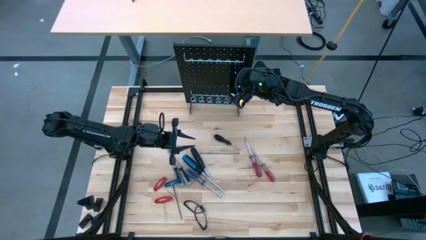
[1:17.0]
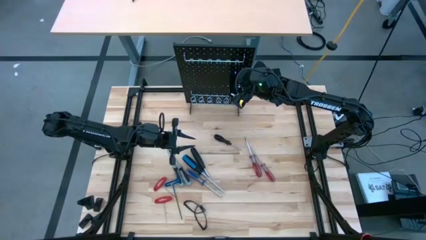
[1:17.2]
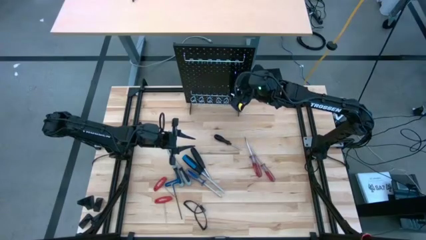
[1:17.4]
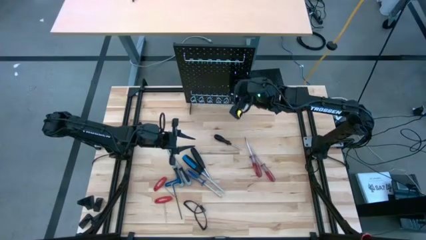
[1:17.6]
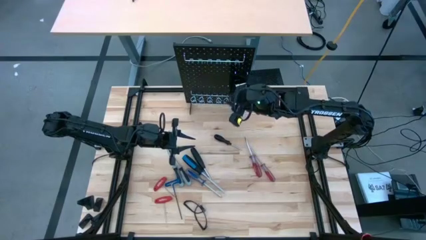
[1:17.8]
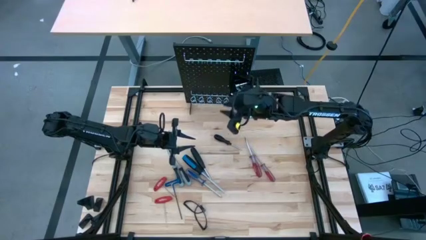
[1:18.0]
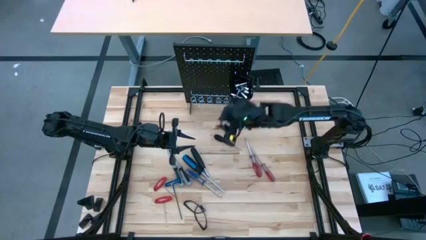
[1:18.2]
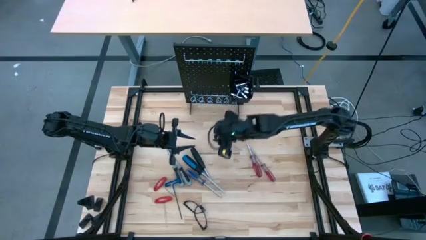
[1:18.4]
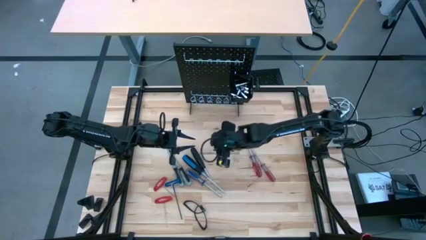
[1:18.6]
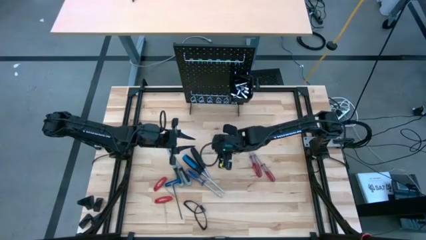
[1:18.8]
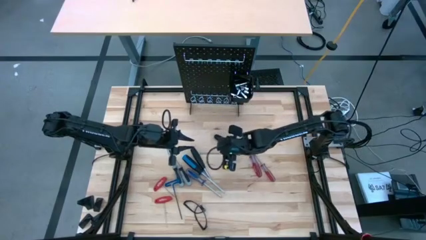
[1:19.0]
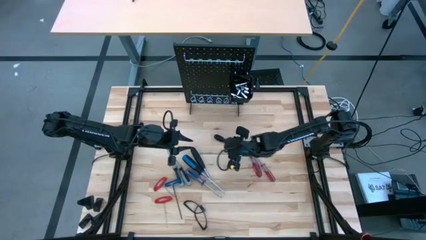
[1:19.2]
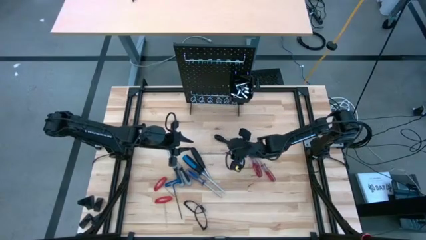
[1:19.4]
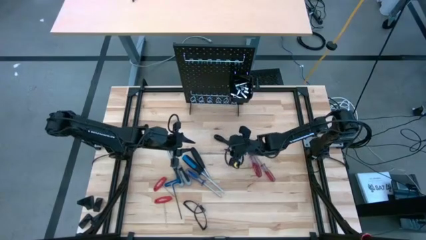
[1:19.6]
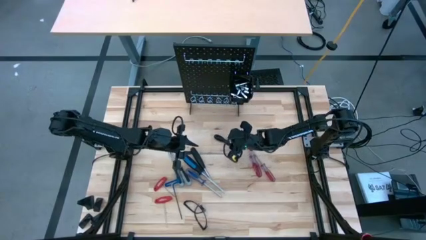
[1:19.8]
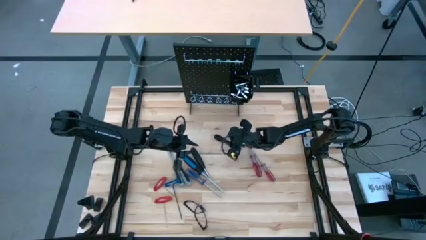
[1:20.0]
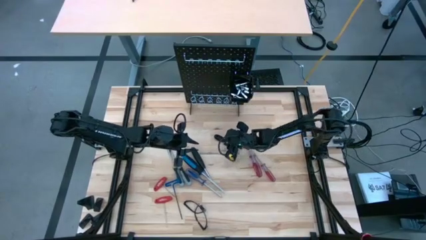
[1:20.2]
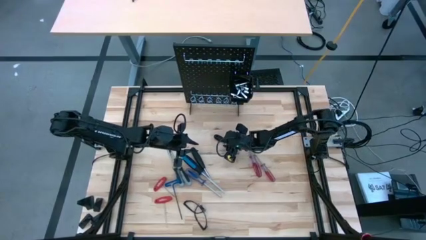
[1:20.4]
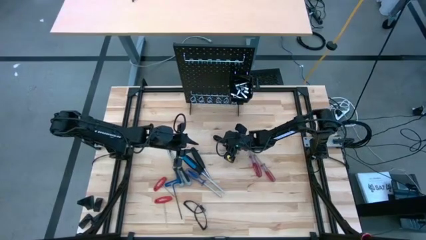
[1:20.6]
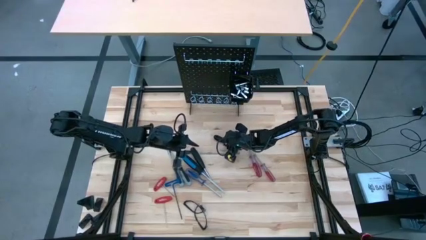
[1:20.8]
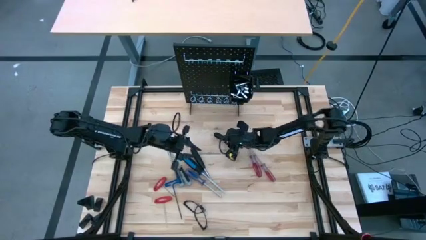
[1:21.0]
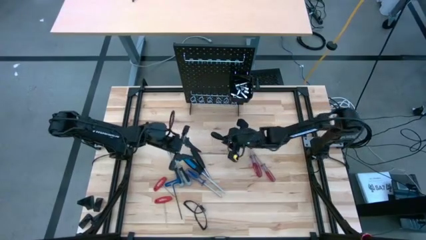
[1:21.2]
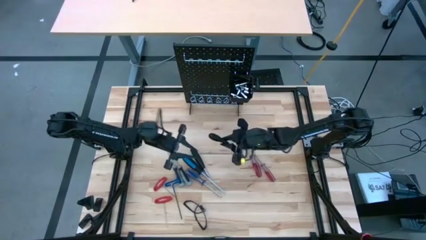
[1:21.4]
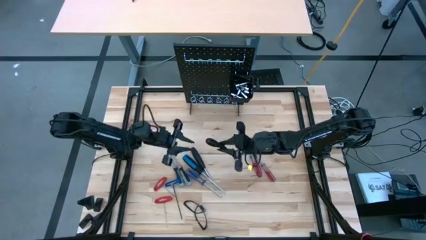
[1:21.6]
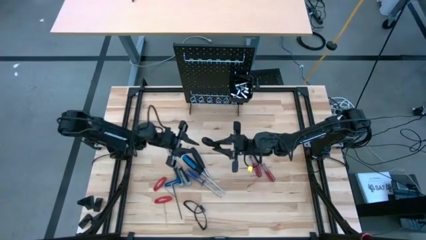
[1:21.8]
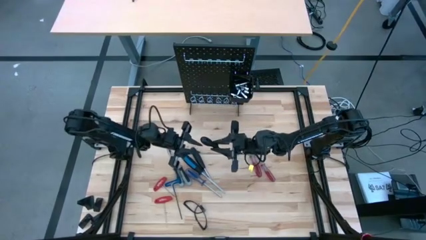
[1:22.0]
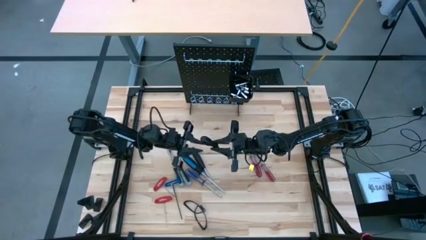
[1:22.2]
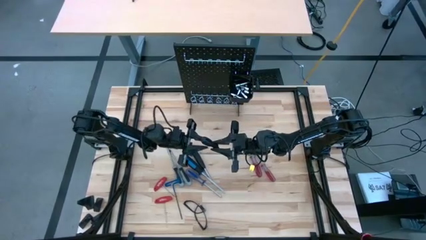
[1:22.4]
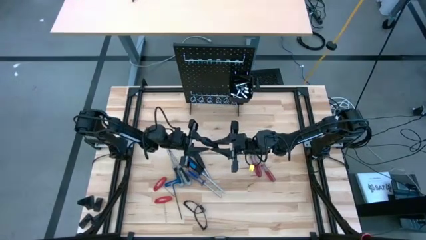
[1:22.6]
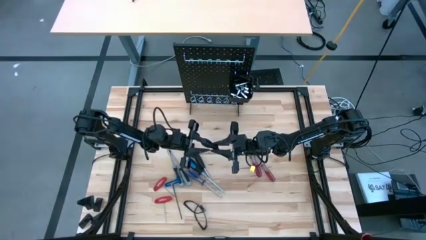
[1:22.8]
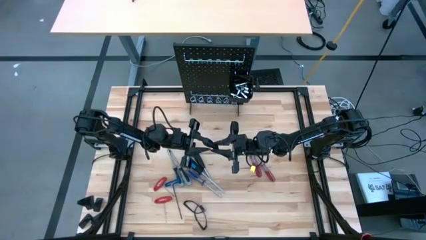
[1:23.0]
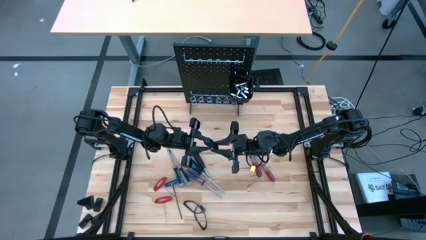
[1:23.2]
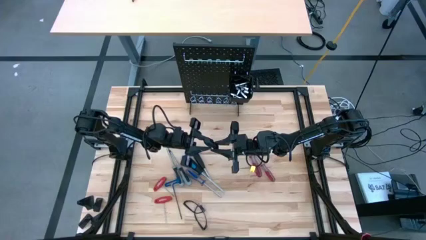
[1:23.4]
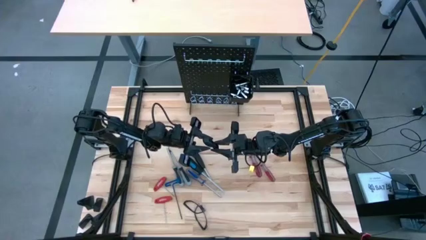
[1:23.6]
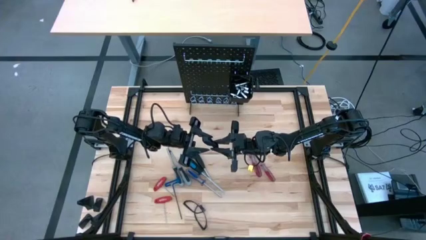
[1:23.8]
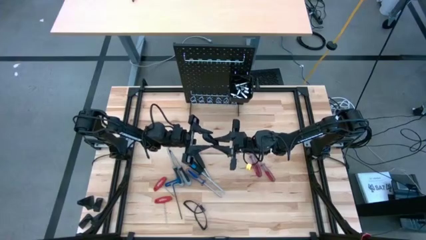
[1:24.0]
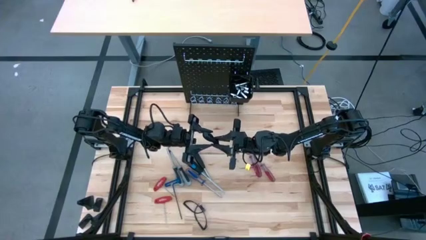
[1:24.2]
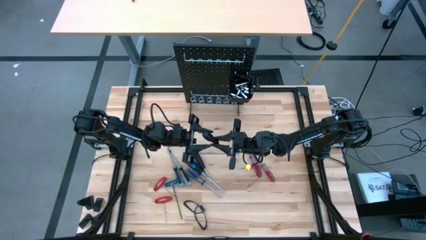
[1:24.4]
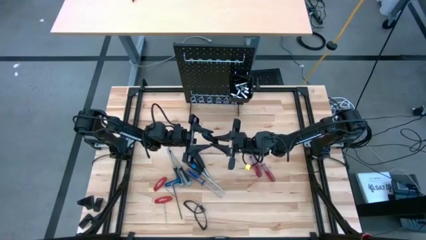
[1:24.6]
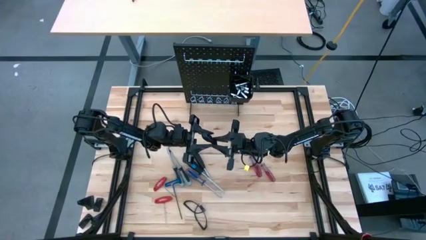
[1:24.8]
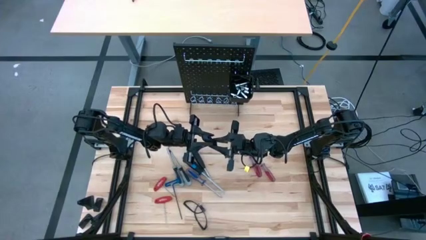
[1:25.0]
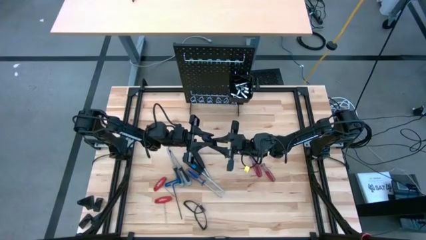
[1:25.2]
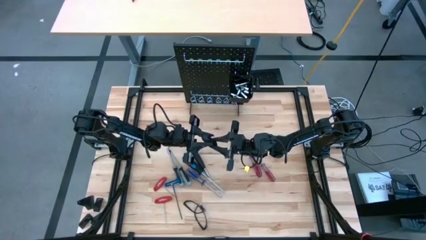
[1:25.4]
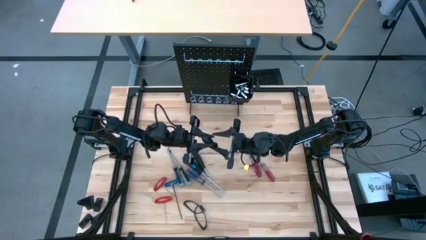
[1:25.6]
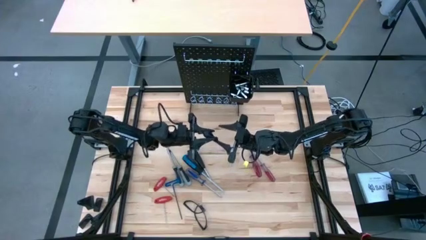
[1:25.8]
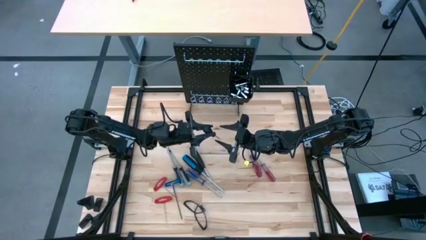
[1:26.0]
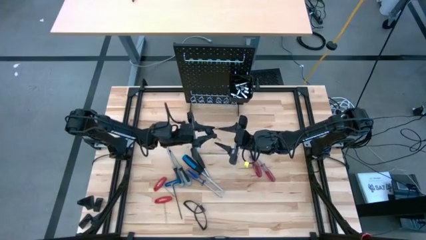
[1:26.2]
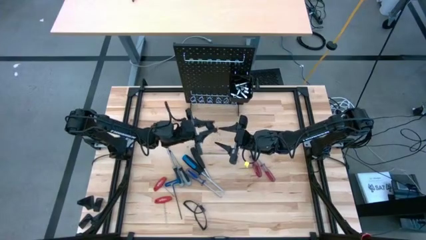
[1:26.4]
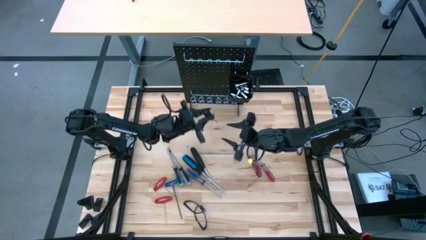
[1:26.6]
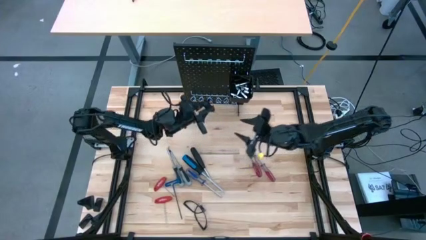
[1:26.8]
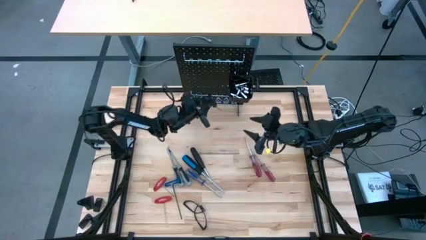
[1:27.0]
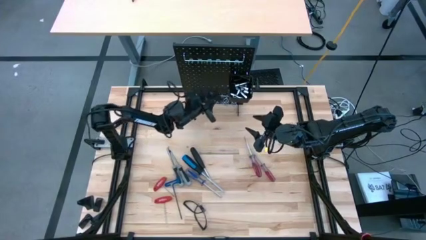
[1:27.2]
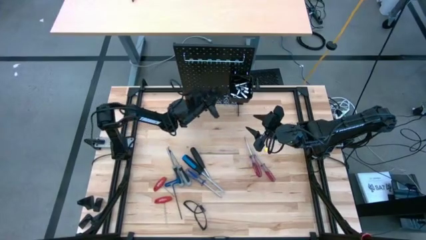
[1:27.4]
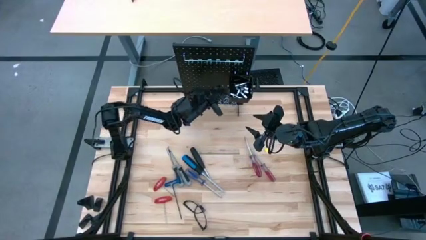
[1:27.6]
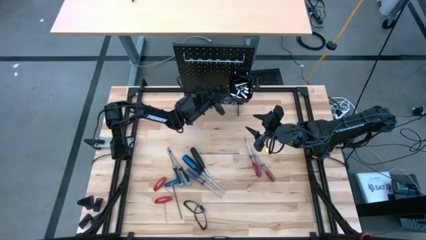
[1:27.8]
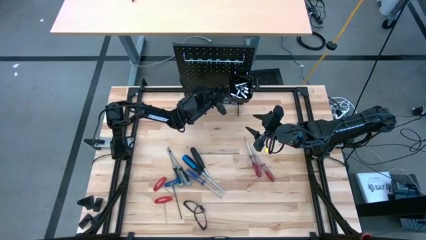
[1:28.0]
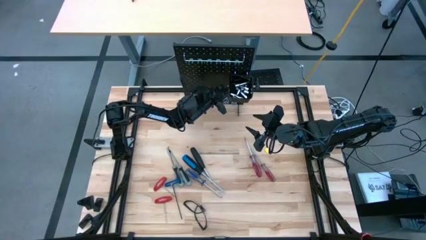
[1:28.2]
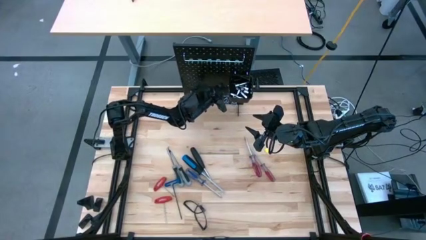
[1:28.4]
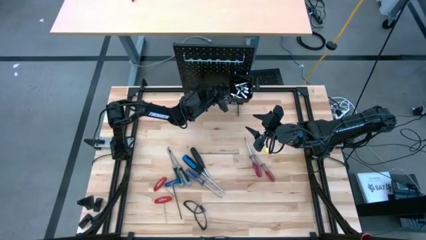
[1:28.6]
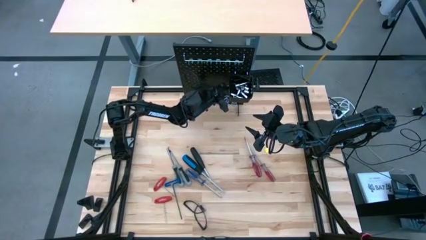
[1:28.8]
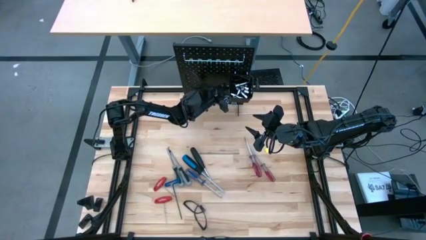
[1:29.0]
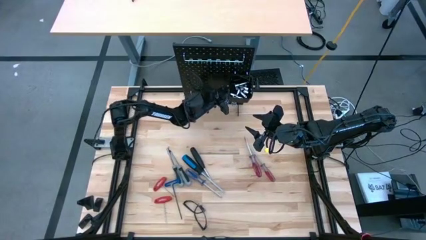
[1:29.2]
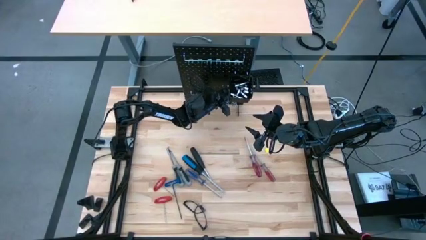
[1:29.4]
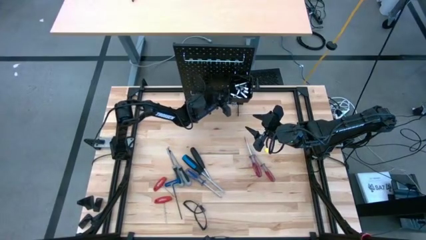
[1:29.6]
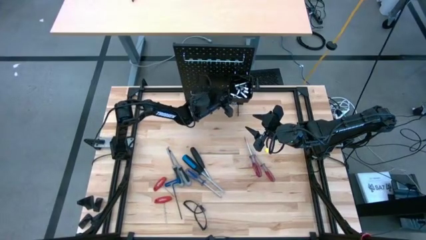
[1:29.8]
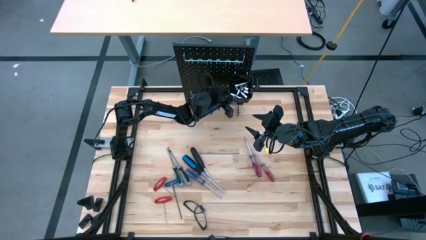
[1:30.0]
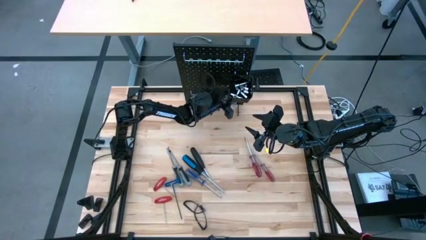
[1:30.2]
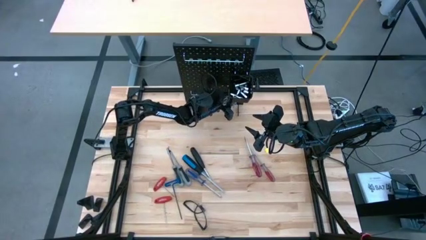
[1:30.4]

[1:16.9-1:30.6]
Task: Hang tools onto peg board
Hang the black screwdriver on the pegboard

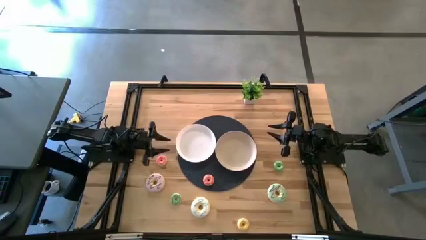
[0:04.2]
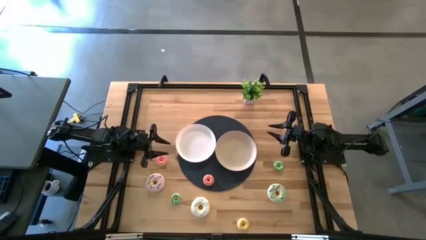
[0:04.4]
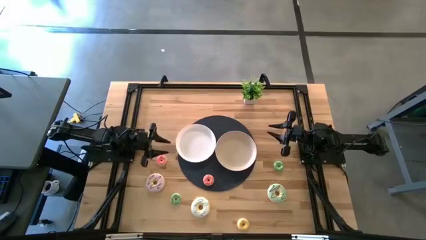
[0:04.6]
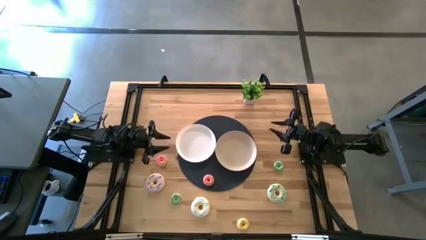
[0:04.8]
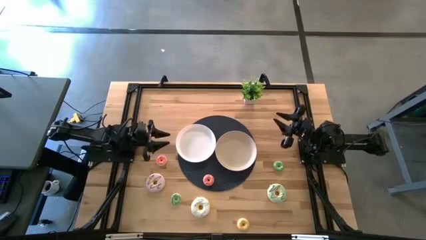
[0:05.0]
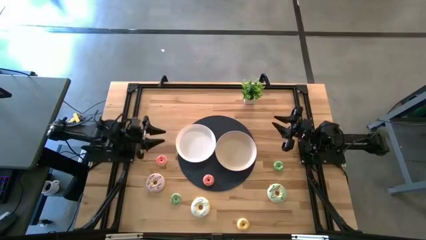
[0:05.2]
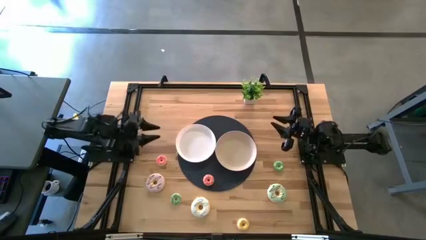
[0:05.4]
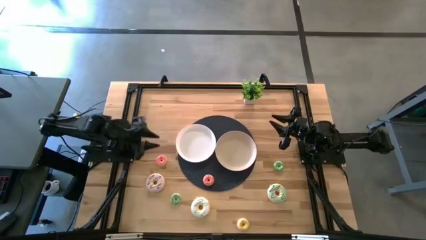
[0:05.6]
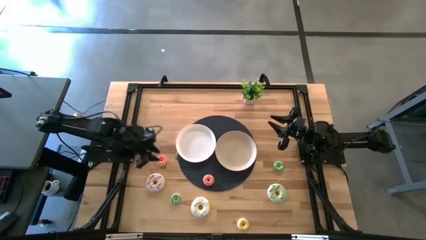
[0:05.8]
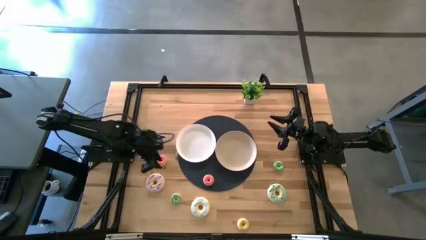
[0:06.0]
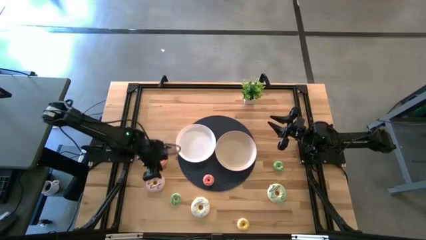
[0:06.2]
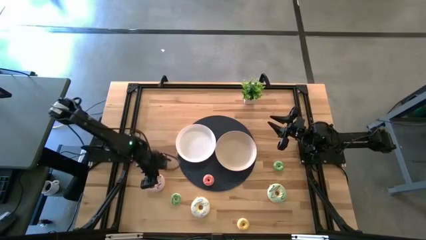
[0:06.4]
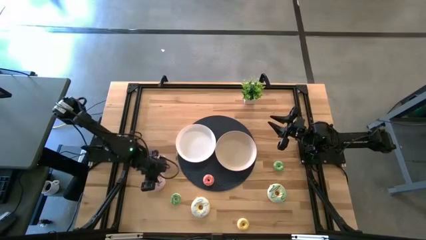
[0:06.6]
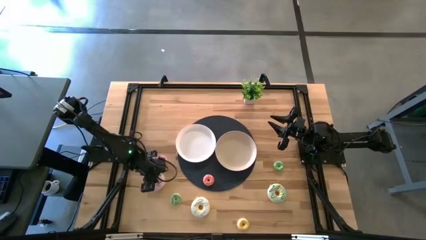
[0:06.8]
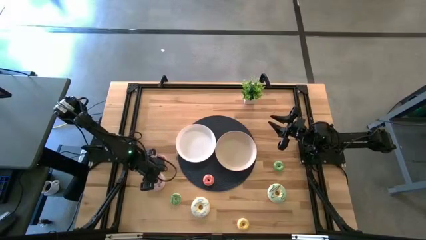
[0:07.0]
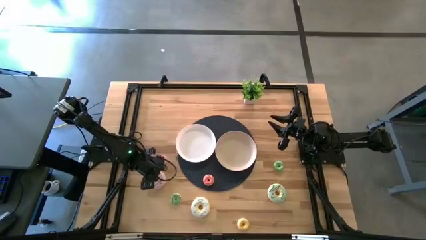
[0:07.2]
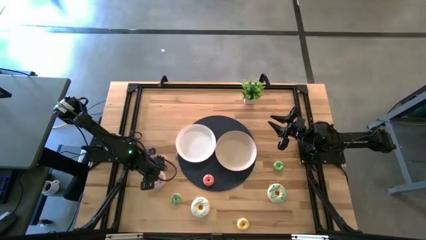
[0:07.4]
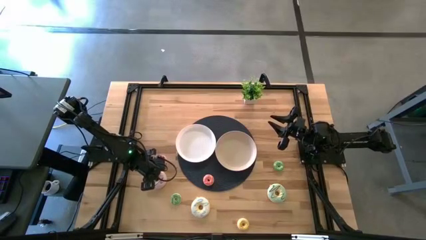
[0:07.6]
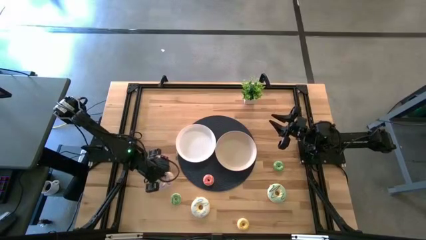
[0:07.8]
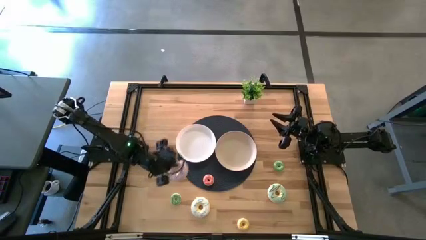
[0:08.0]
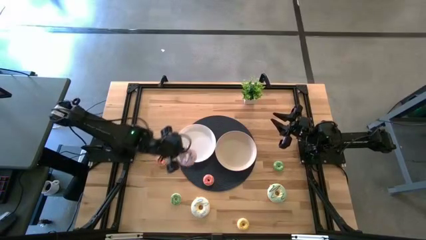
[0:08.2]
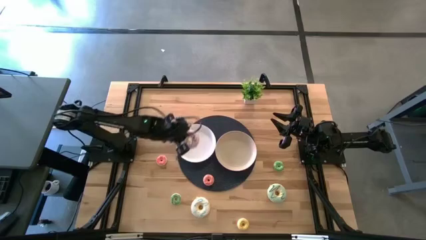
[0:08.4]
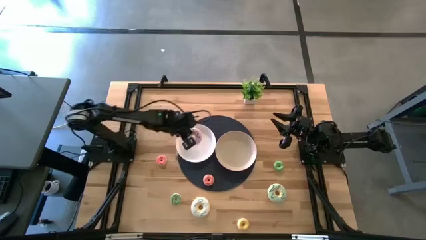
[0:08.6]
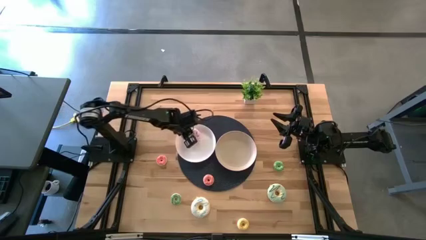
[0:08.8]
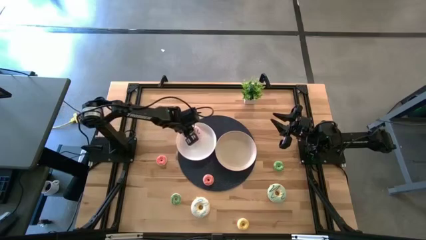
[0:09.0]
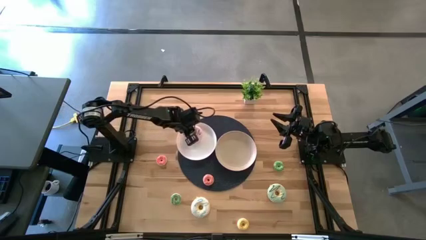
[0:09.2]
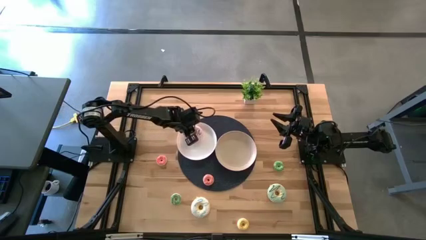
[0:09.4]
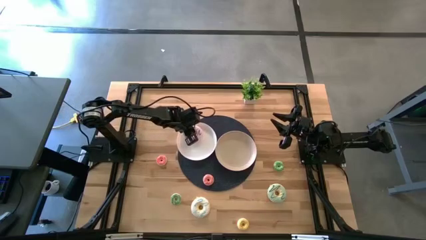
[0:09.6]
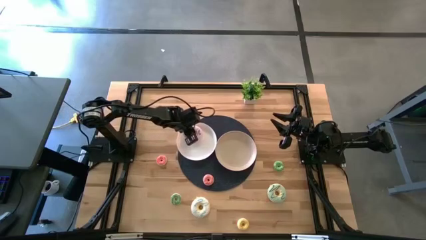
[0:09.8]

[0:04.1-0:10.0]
Task: Pick & Place donuts
Put the large purple donut on the white plate
